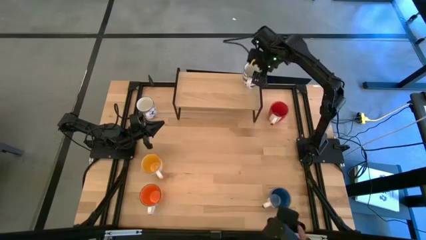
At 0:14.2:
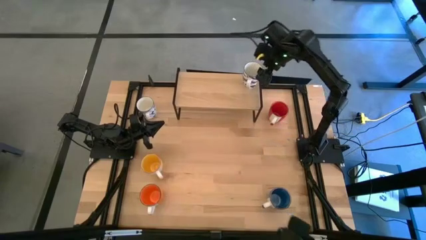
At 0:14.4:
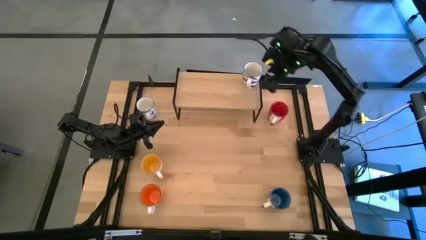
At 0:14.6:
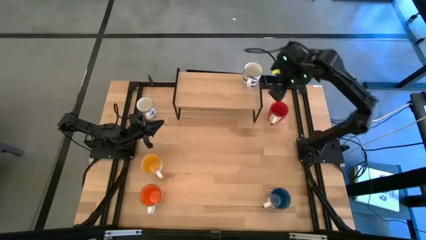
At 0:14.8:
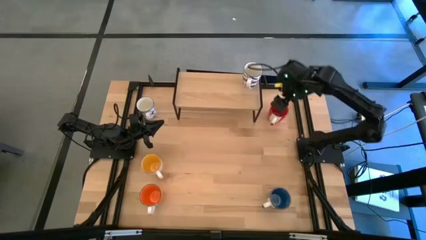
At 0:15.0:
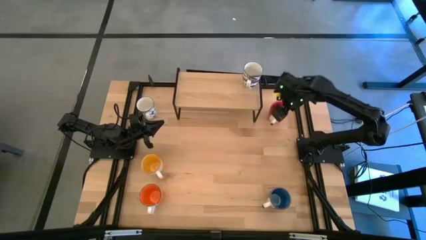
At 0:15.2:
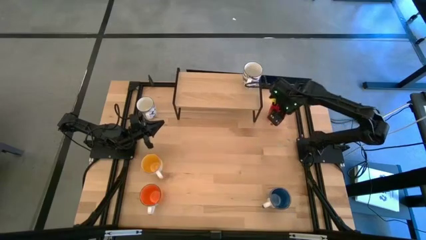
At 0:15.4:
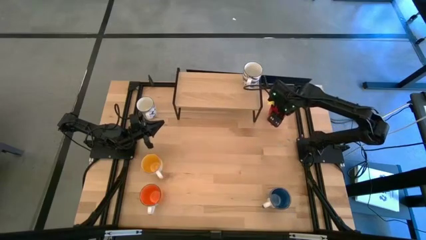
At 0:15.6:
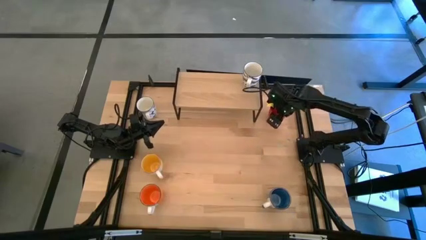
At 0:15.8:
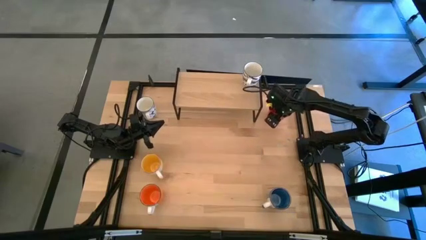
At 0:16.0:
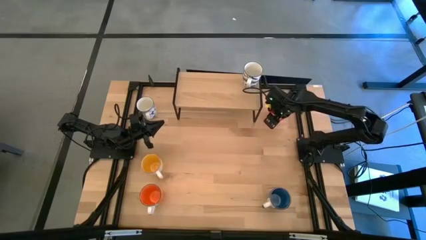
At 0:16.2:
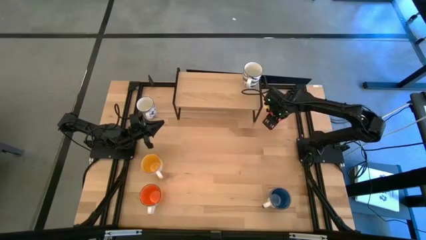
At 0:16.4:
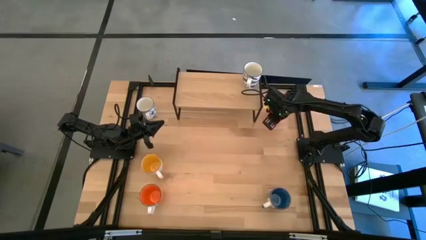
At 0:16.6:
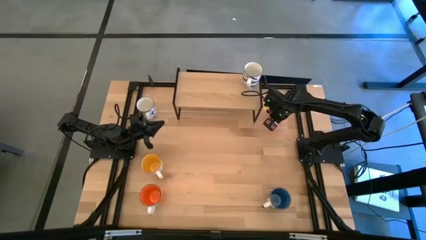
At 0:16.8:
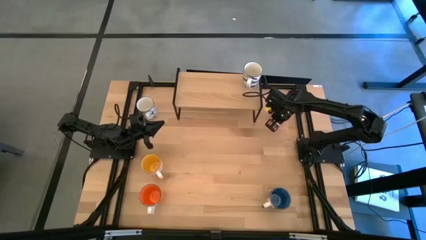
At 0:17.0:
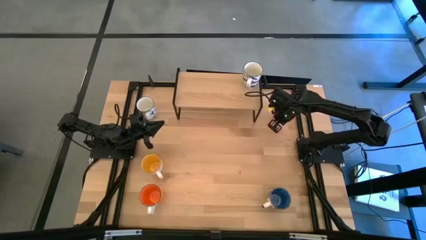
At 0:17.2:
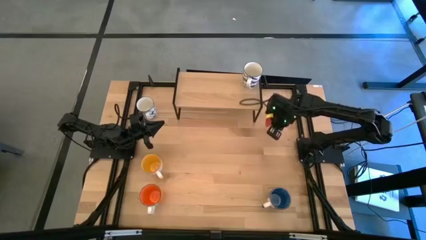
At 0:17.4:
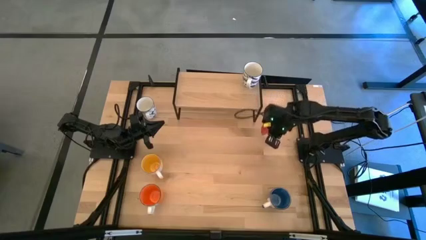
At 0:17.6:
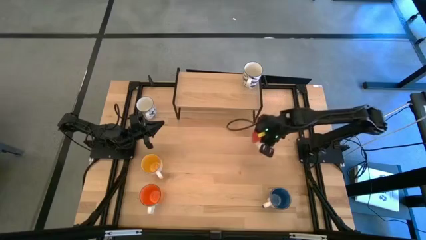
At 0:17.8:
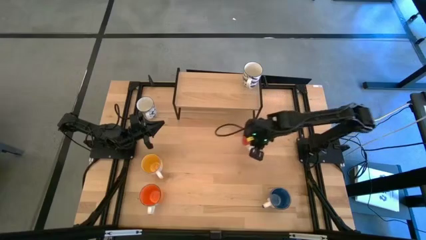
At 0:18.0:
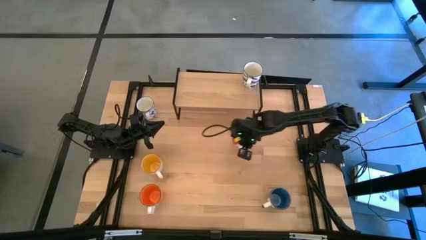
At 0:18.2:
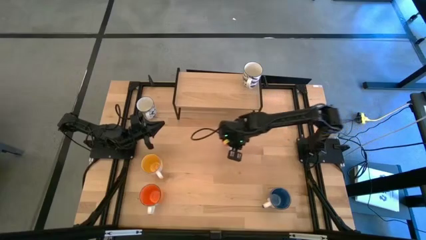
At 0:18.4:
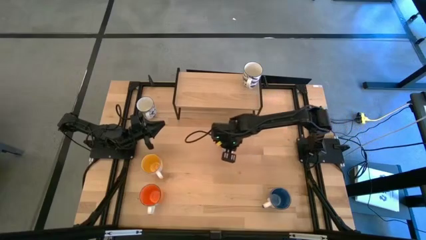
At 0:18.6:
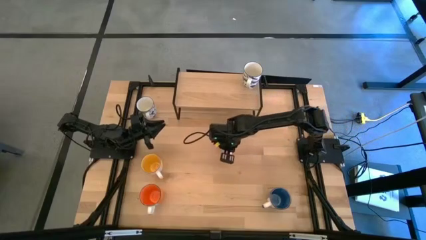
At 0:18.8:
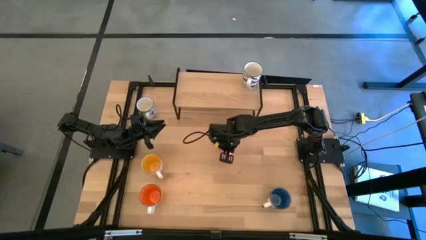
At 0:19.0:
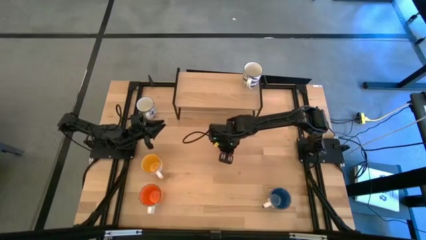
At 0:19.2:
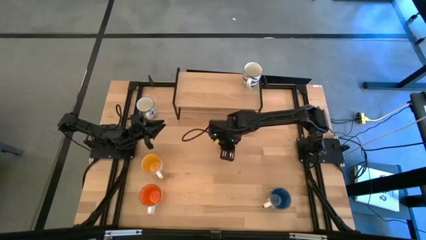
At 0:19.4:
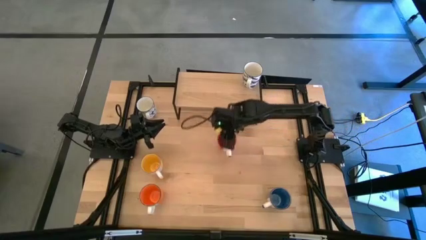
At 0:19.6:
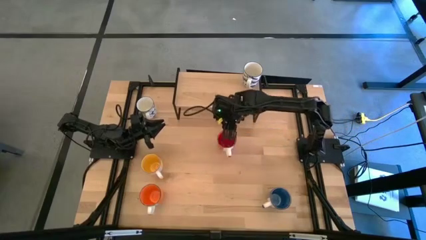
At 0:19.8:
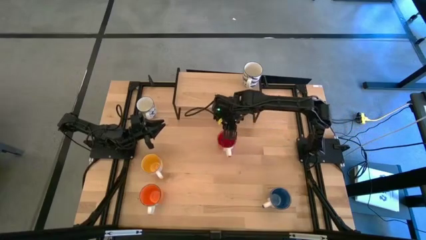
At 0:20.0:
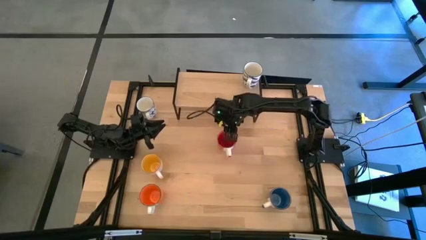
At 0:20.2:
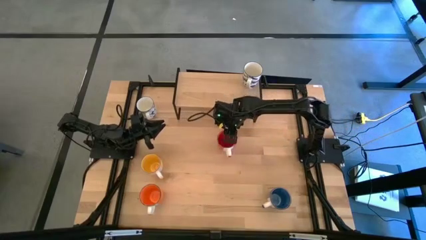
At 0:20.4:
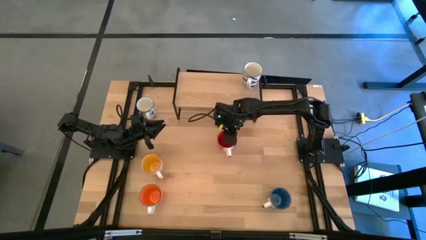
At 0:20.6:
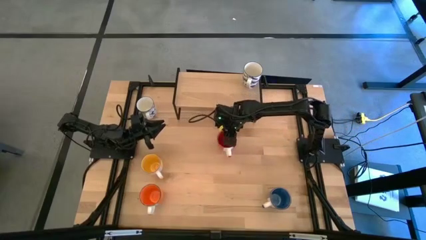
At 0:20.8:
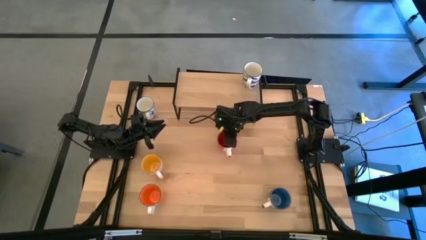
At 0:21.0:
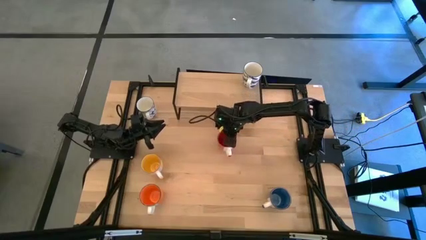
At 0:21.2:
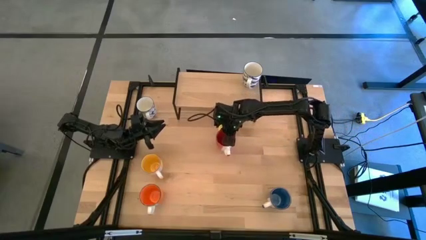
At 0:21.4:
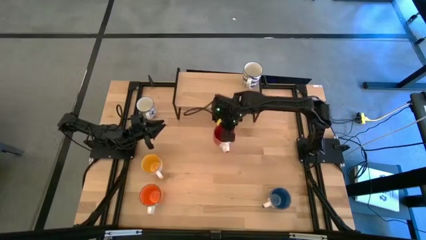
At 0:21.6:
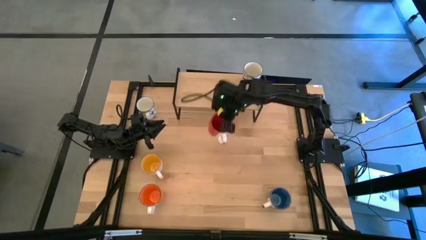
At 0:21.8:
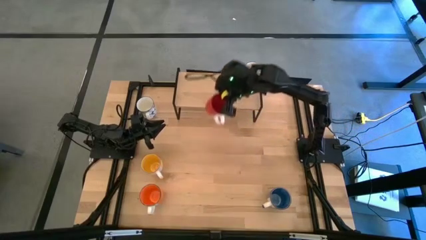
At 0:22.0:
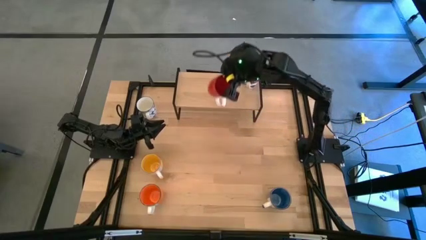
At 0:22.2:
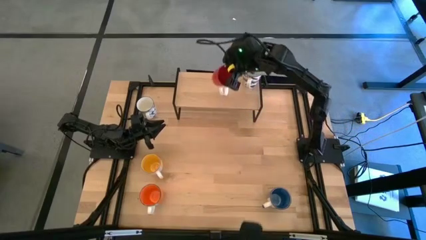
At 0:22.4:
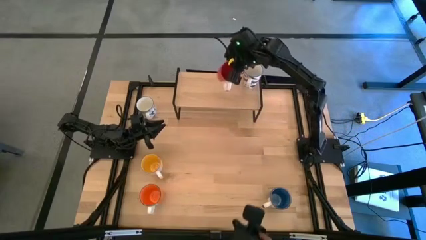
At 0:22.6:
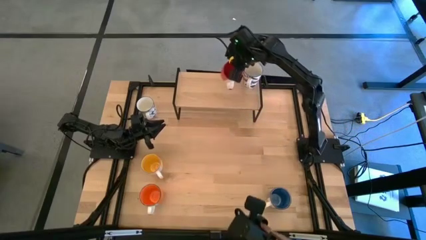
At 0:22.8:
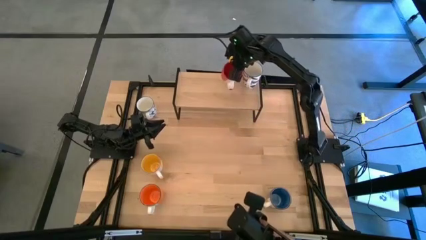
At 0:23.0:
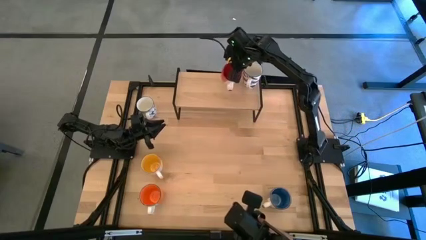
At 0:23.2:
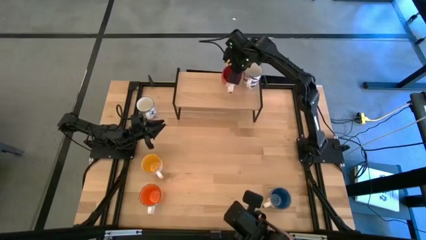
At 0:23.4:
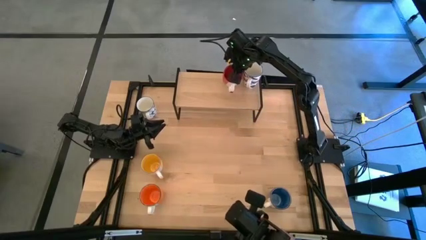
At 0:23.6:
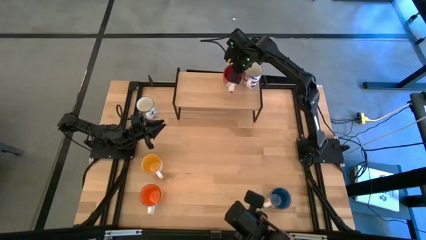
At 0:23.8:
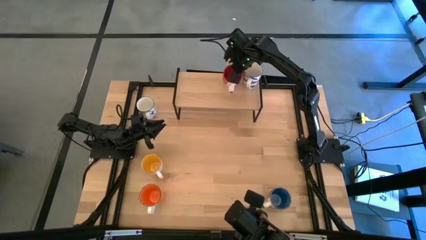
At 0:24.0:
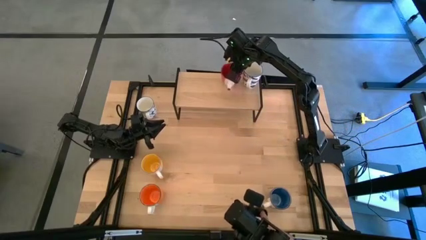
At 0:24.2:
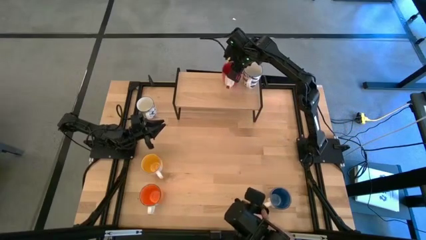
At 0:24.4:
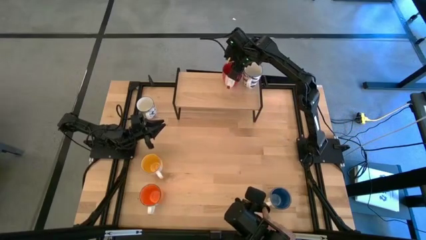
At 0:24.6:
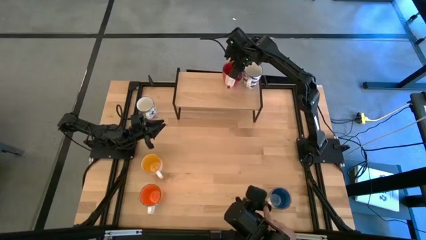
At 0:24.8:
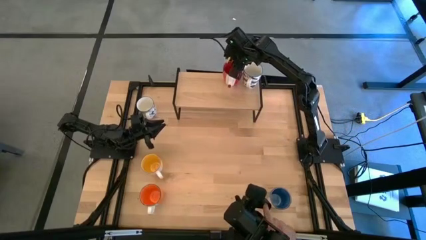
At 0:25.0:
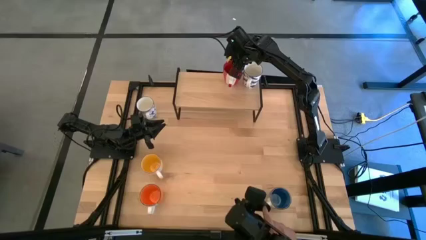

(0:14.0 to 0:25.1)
Task: Place coffee mugs
Put the red mug on the shelf

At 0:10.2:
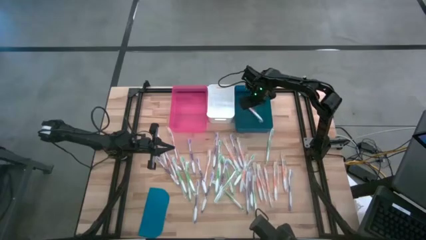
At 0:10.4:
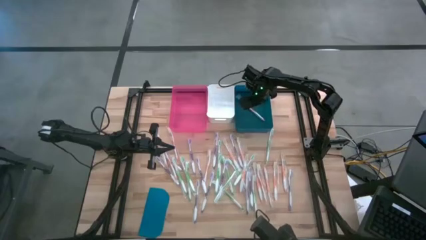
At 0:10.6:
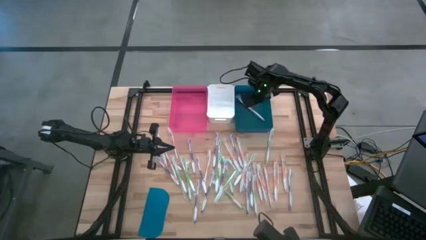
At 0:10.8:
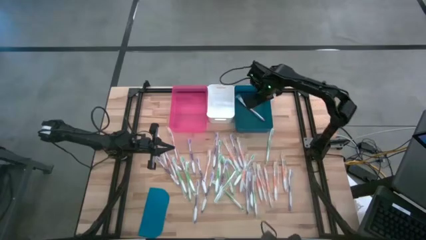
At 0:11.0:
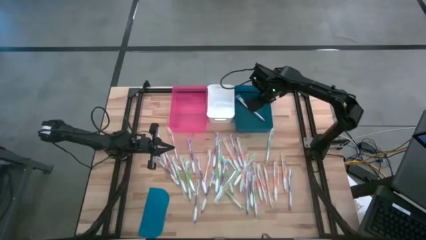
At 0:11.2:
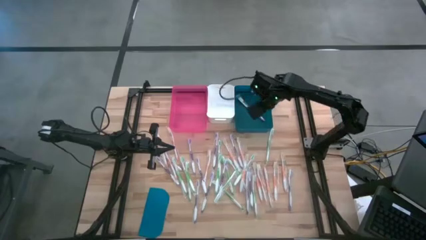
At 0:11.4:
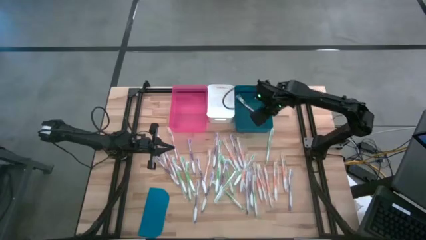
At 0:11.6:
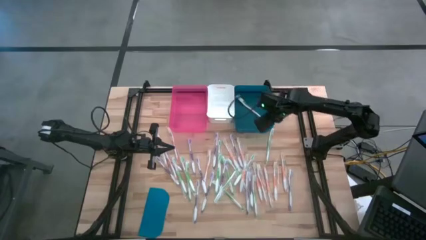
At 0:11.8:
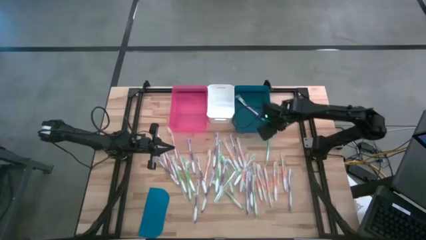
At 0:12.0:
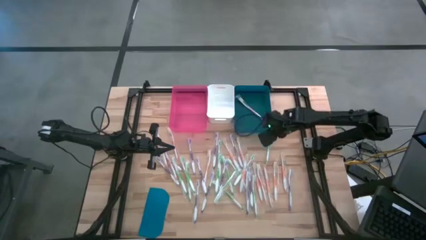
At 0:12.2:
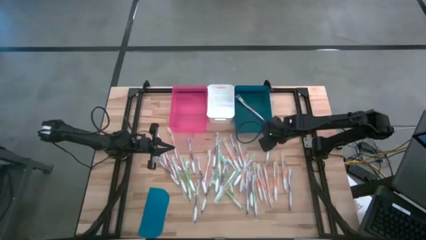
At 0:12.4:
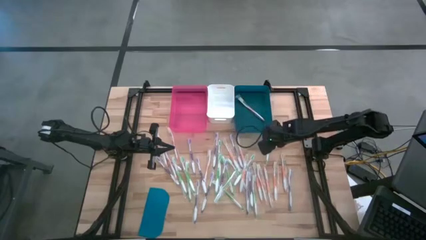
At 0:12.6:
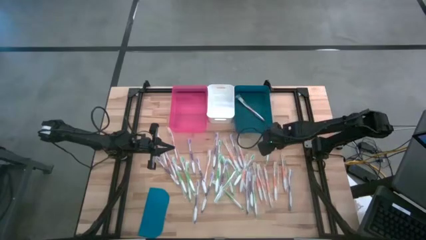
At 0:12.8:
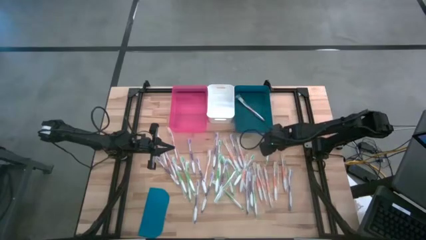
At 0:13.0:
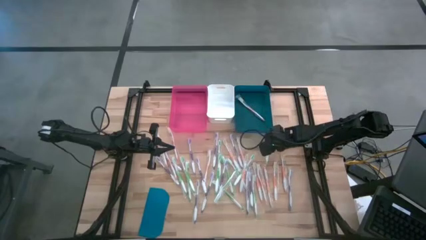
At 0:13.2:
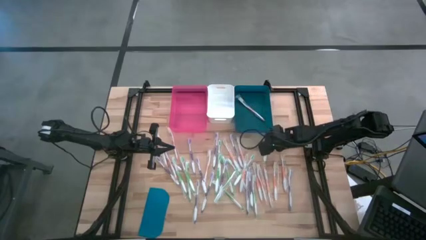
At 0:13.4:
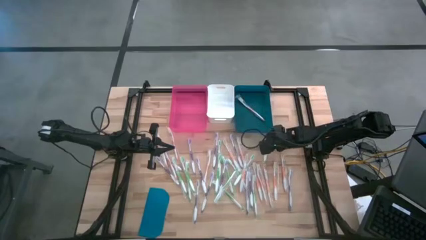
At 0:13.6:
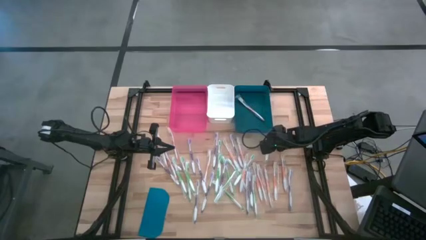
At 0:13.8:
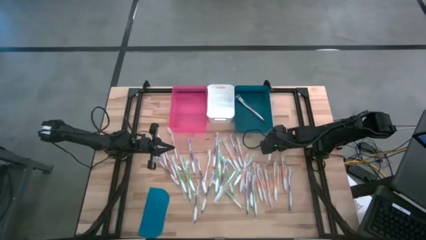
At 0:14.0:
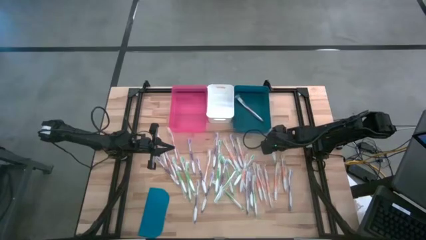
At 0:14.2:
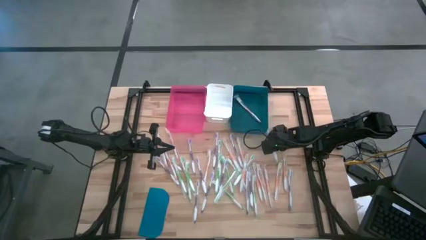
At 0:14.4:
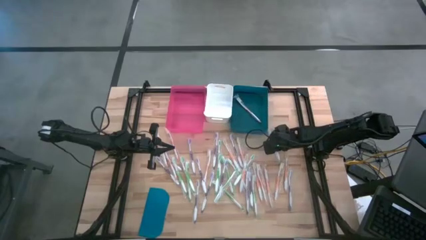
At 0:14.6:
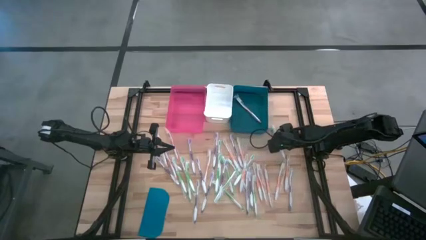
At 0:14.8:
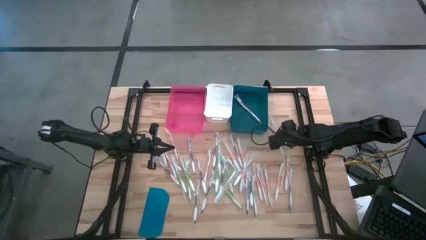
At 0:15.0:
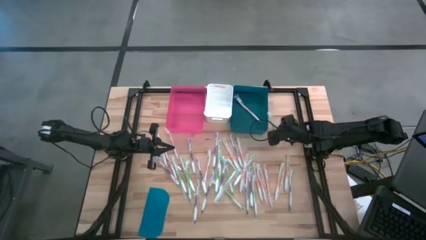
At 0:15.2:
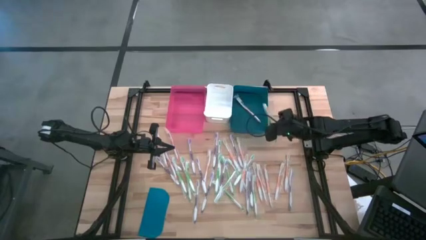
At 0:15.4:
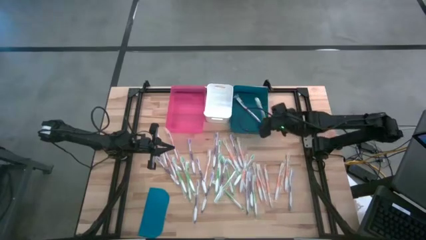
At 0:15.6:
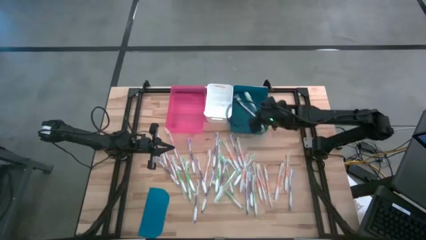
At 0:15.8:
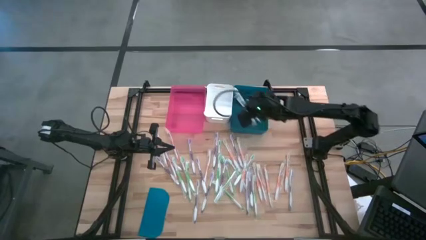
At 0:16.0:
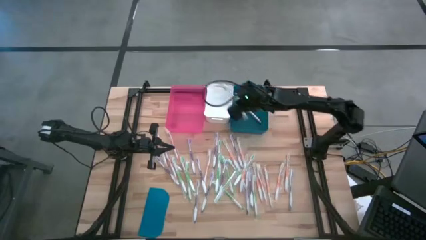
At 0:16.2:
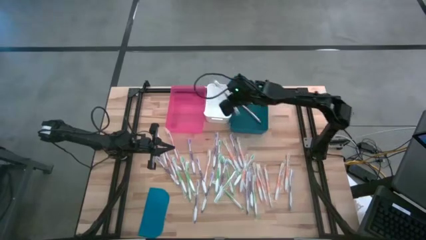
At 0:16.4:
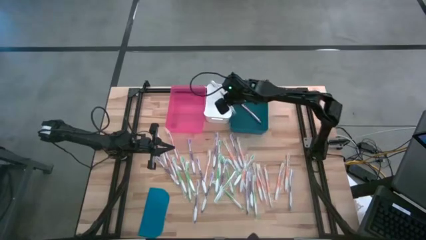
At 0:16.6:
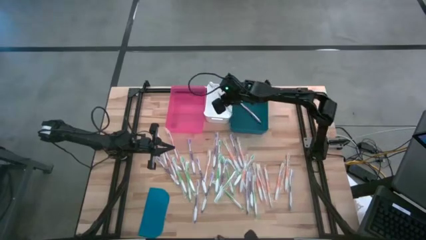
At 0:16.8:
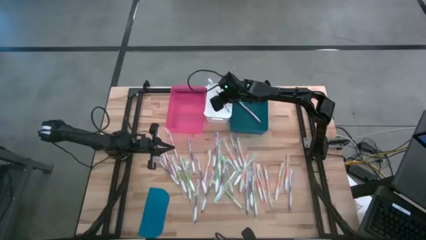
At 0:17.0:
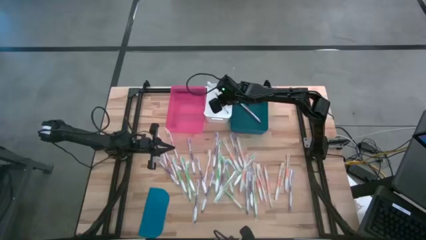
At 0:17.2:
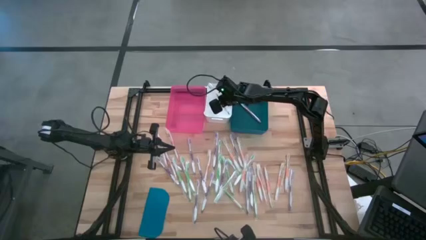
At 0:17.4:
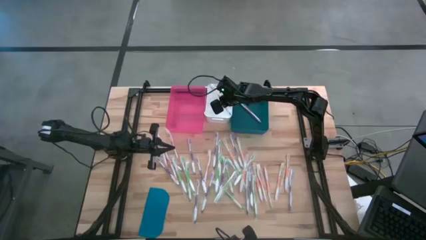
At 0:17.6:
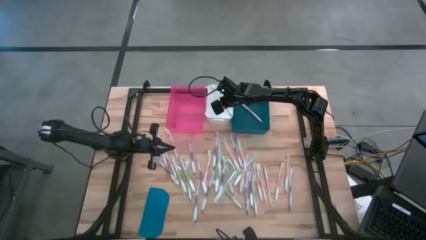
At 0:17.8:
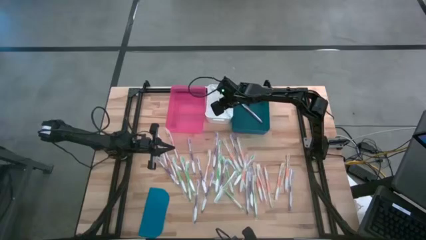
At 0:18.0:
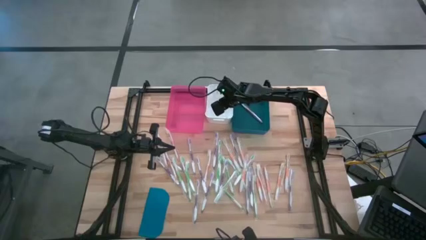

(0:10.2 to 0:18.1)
Task: Pick & Place Toothbrushes
Put the green toothbrush into the white bin
